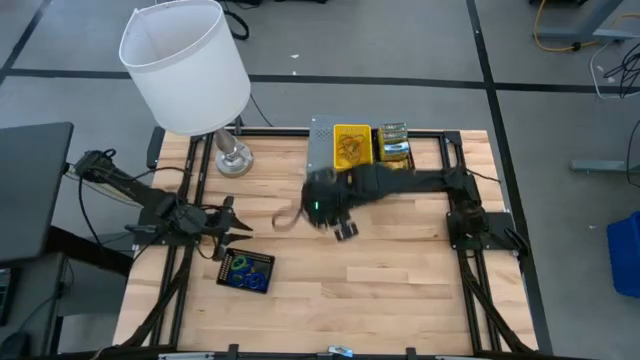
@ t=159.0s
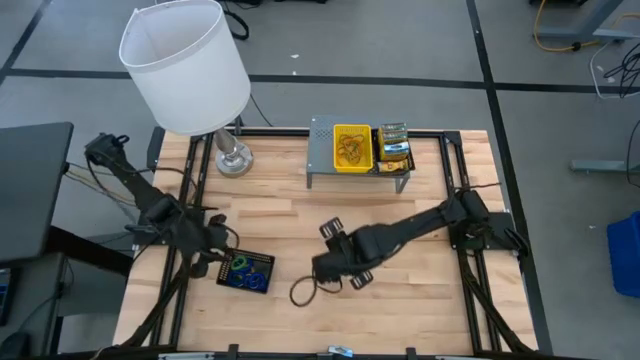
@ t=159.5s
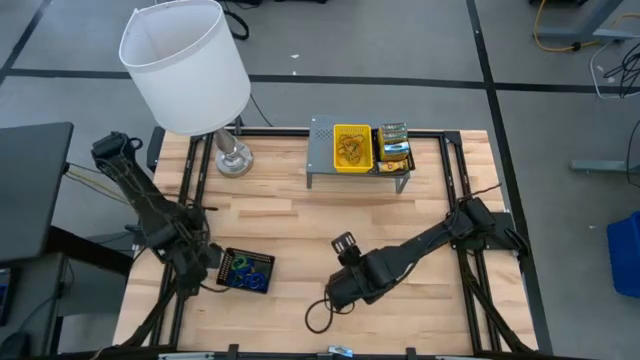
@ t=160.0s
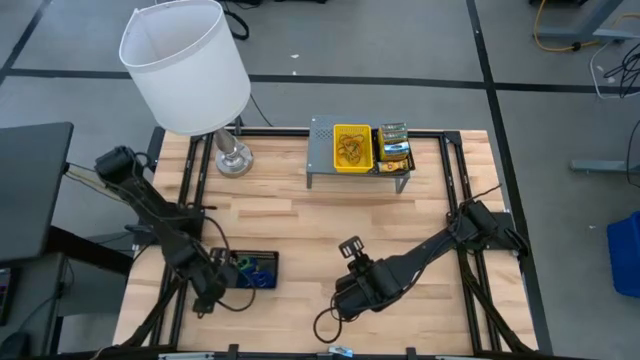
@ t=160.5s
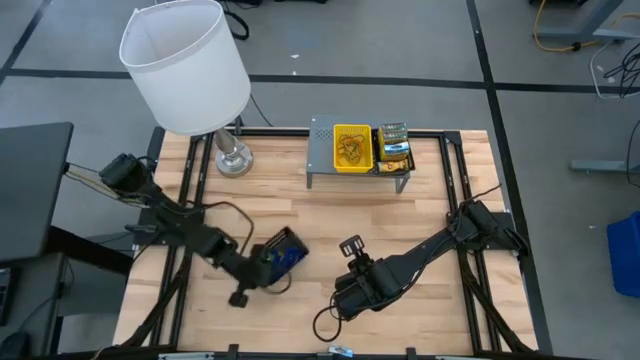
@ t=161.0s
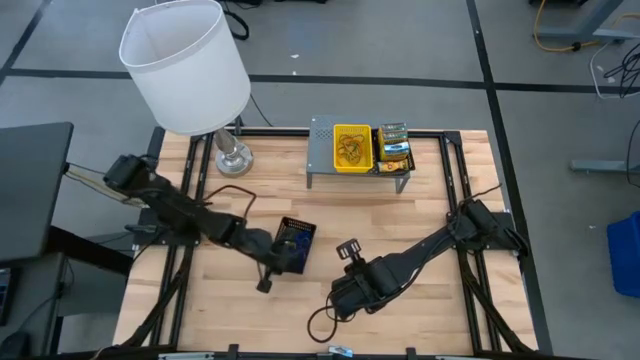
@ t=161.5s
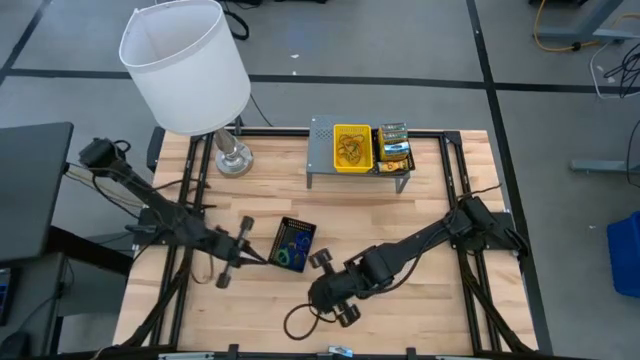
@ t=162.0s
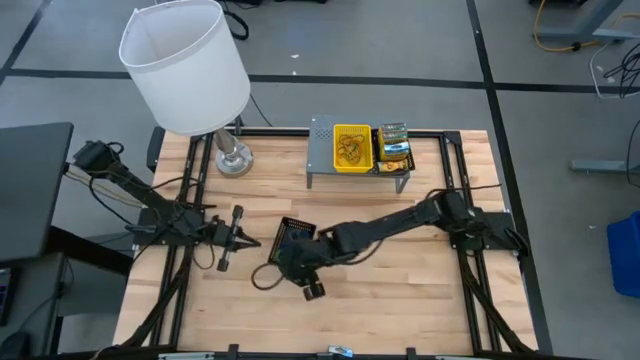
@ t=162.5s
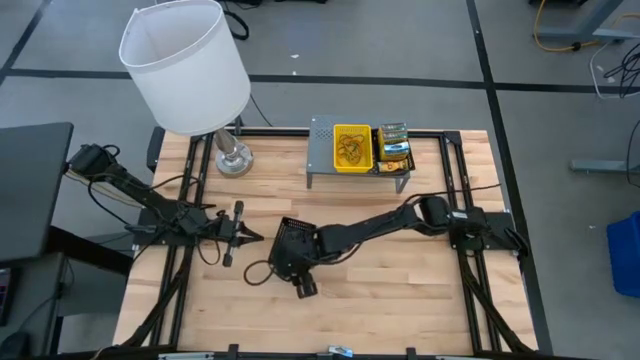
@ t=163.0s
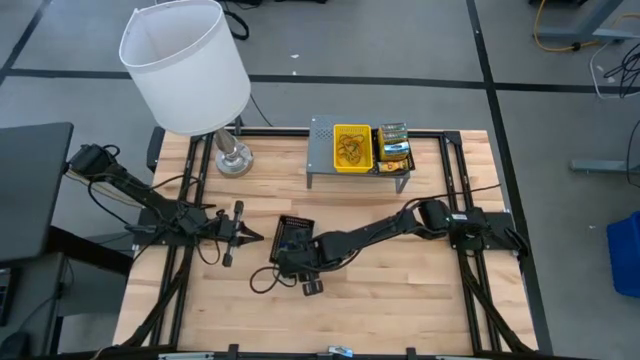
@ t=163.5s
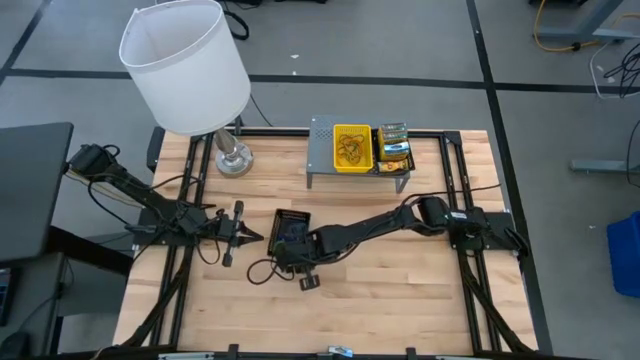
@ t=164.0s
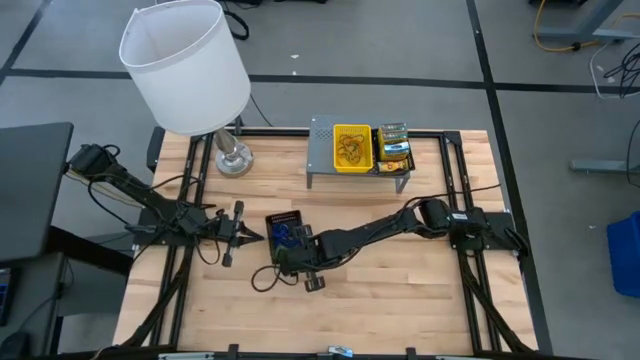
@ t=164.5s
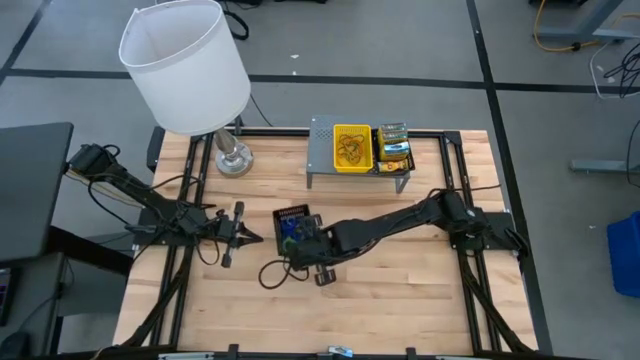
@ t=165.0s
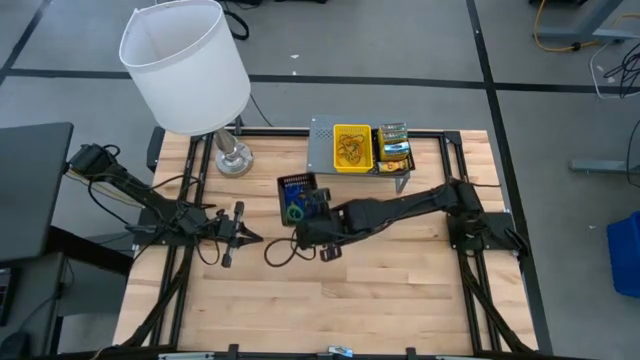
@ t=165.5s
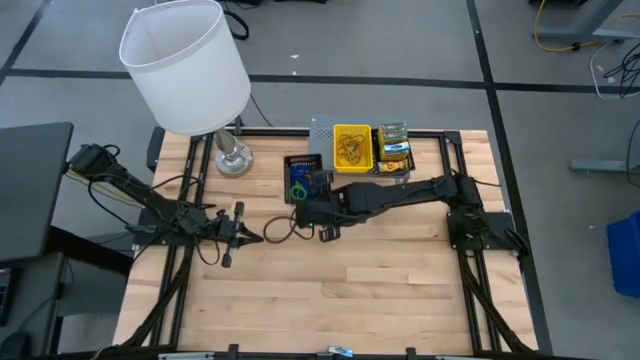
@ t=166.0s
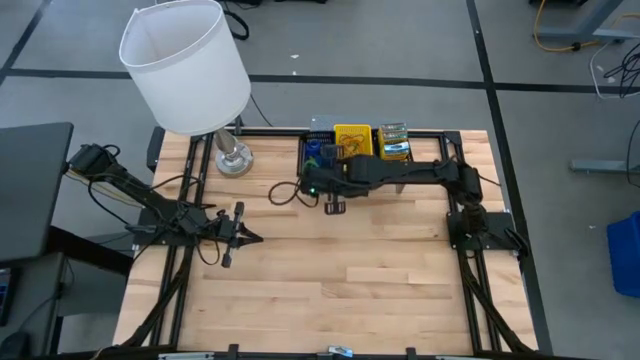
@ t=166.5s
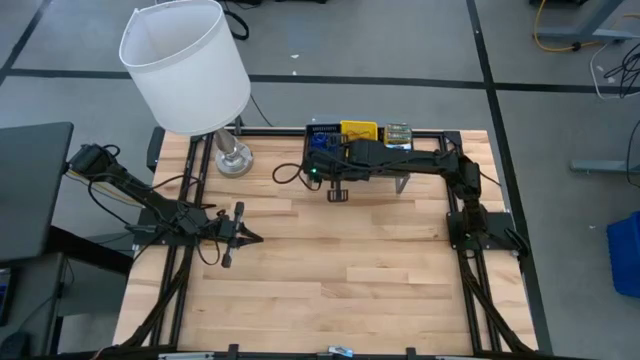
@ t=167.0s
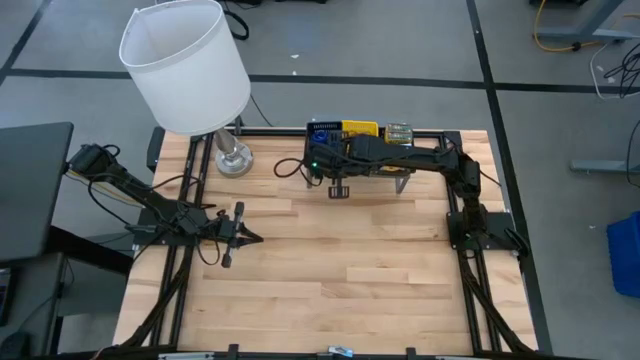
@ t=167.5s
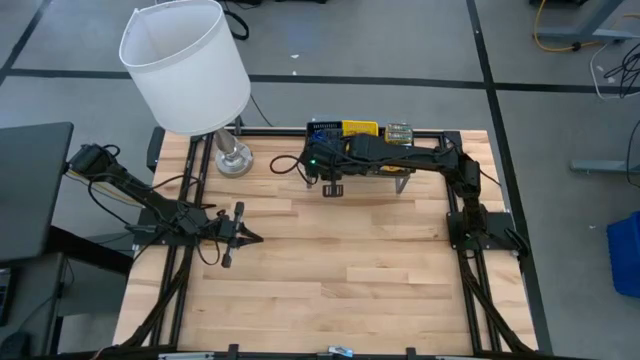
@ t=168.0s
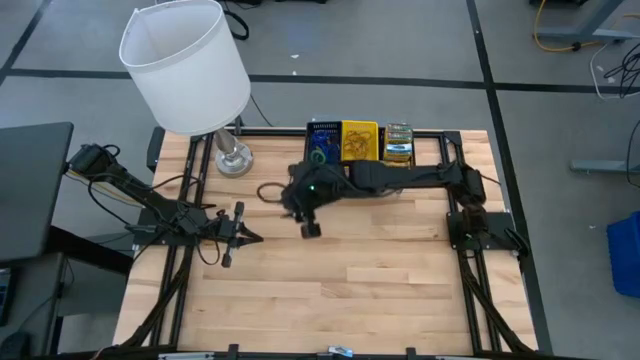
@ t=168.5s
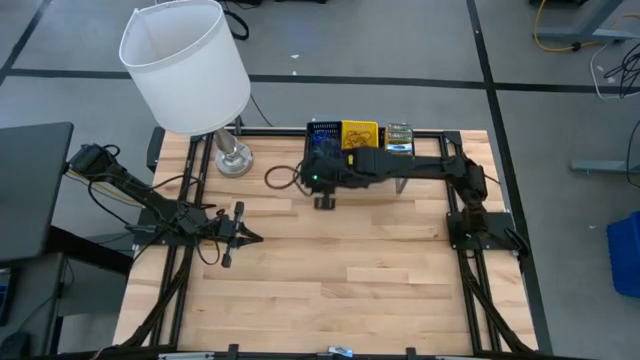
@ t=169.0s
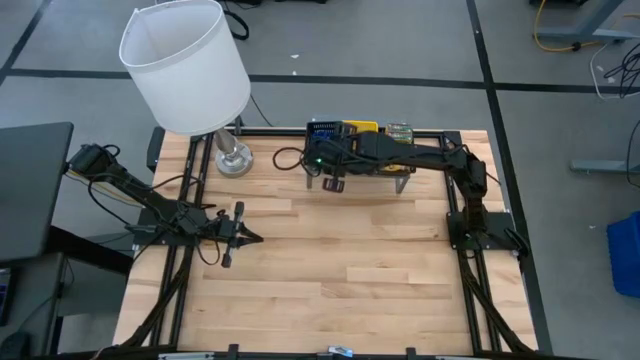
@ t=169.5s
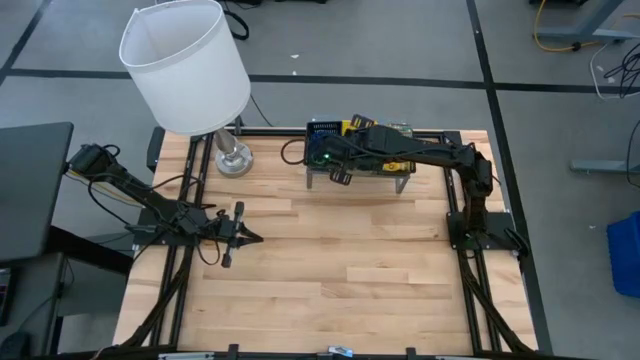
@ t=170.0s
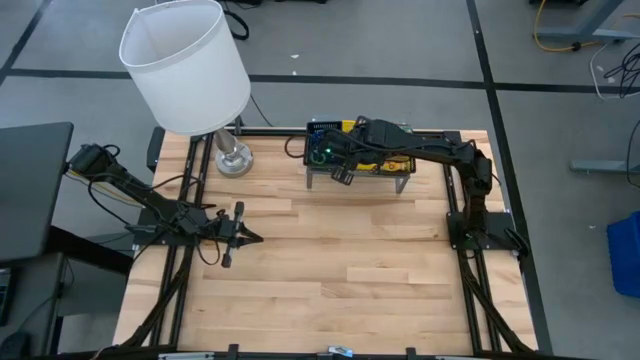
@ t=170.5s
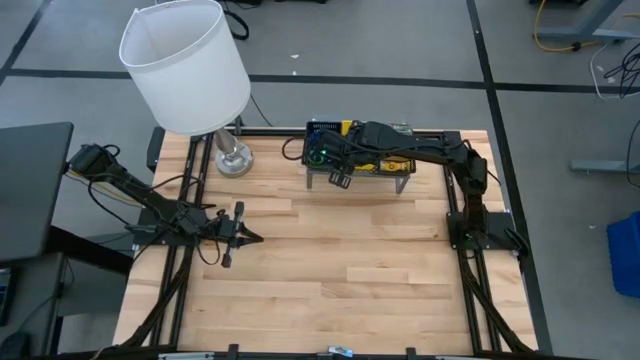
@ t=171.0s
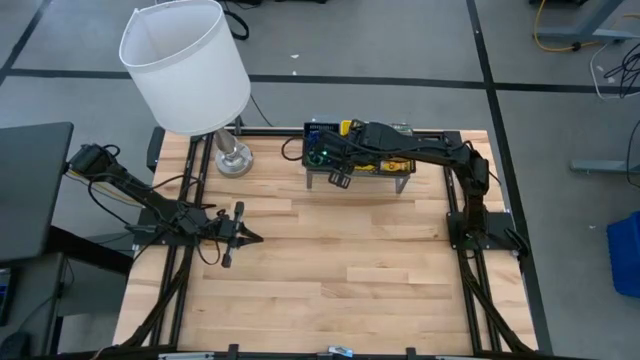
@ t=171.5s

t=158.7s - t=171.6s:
Task: Pick & Place Office Desk Supplies
Put the black bin with spring keychains on the shelf

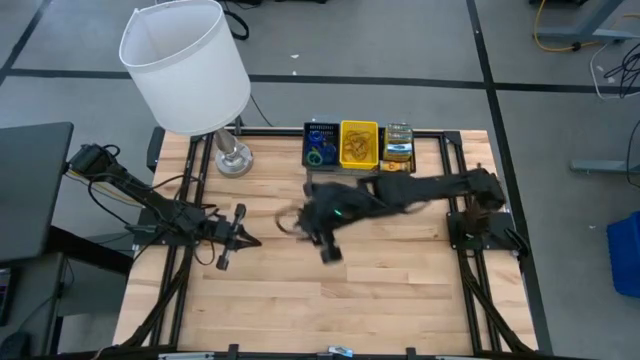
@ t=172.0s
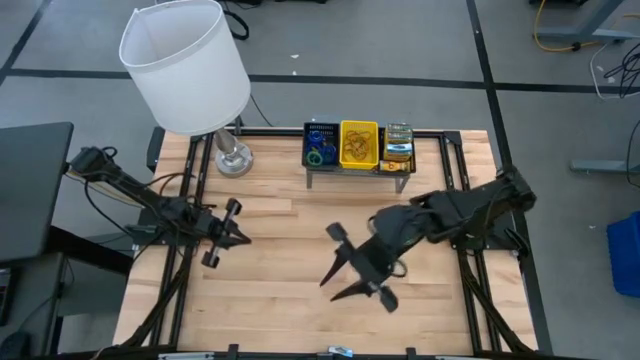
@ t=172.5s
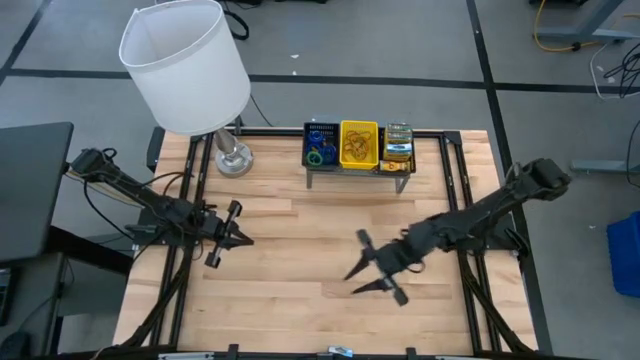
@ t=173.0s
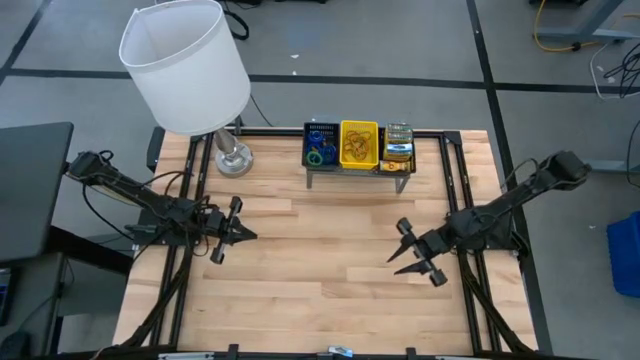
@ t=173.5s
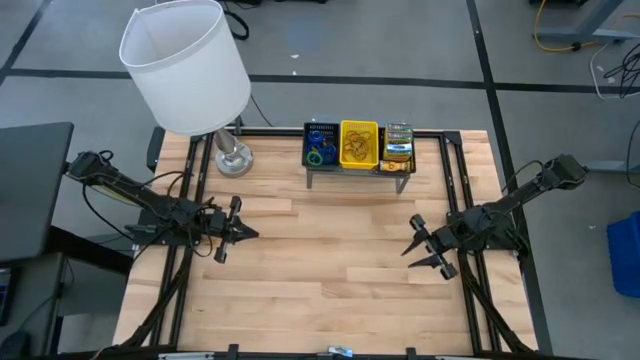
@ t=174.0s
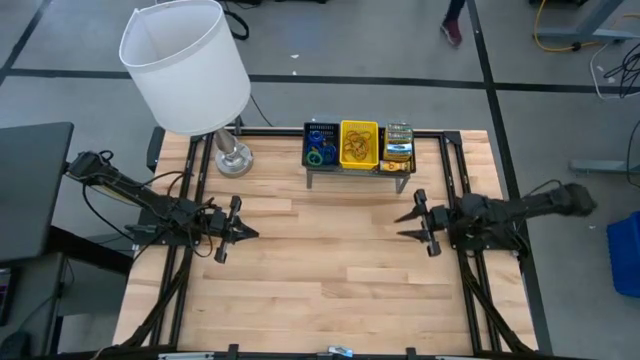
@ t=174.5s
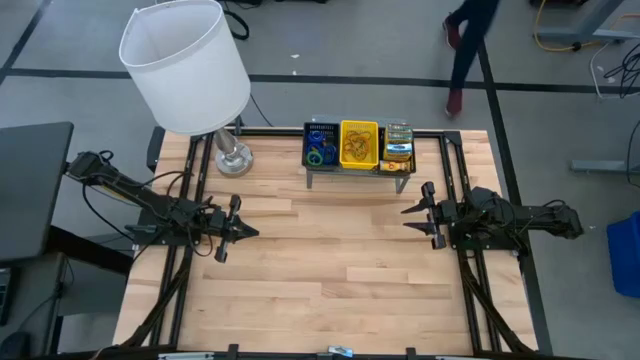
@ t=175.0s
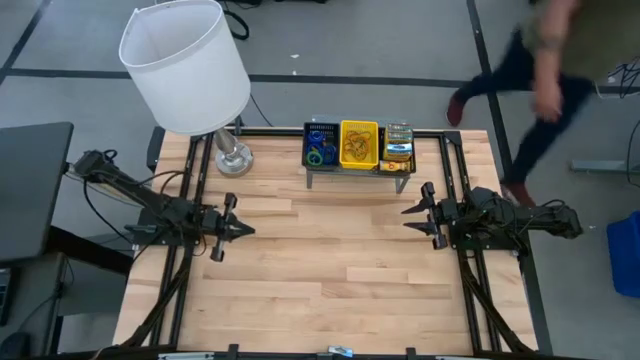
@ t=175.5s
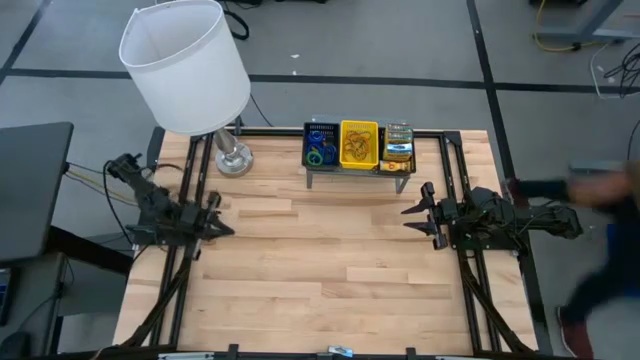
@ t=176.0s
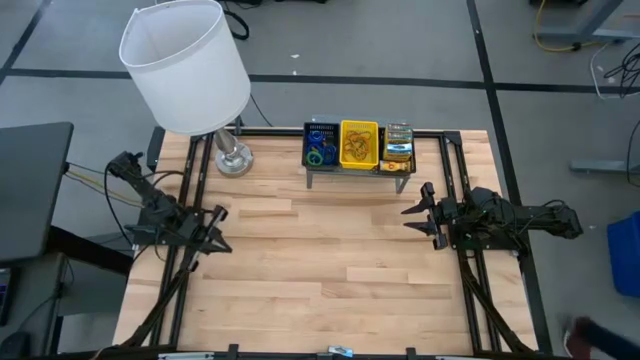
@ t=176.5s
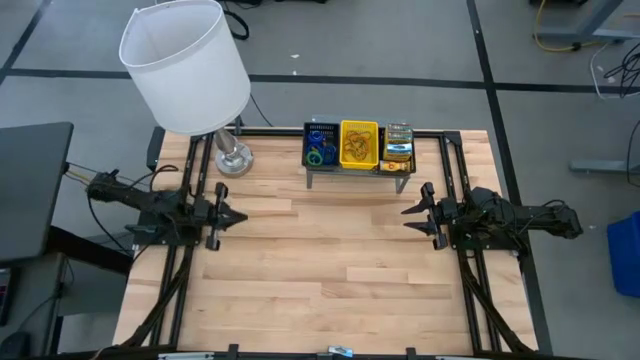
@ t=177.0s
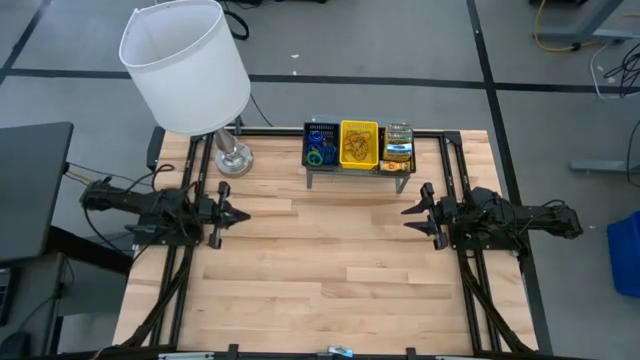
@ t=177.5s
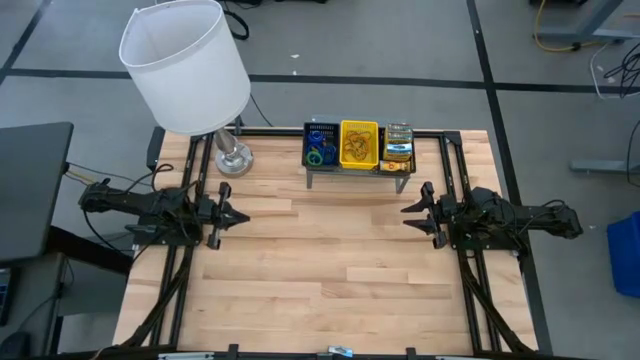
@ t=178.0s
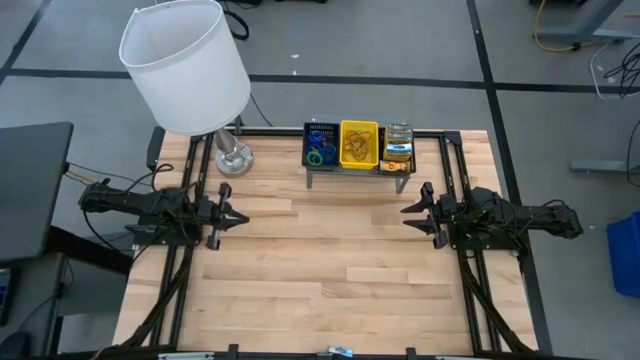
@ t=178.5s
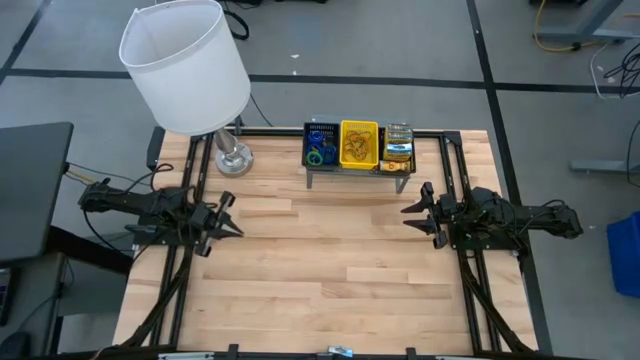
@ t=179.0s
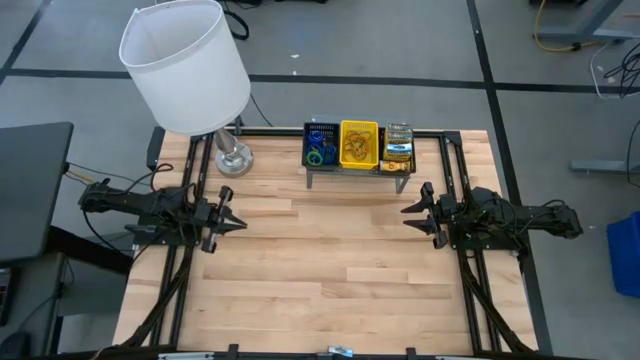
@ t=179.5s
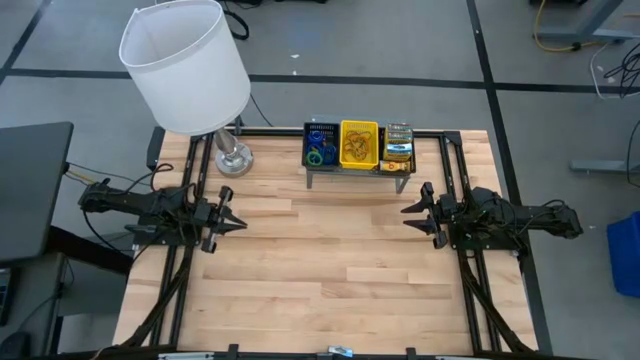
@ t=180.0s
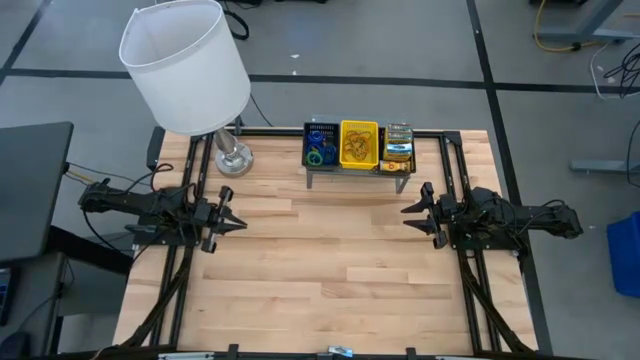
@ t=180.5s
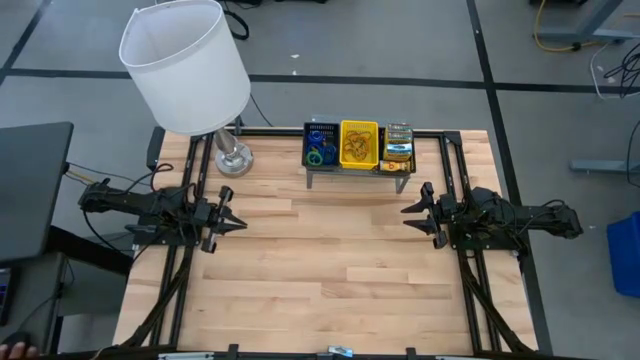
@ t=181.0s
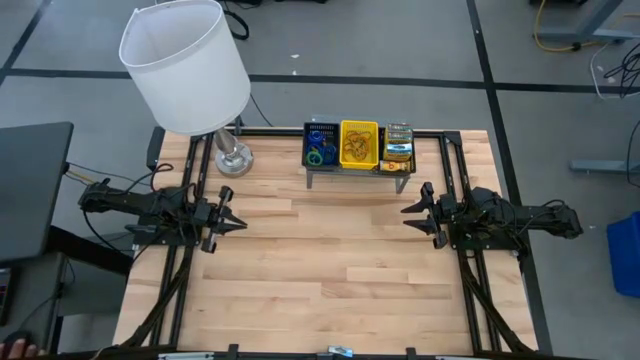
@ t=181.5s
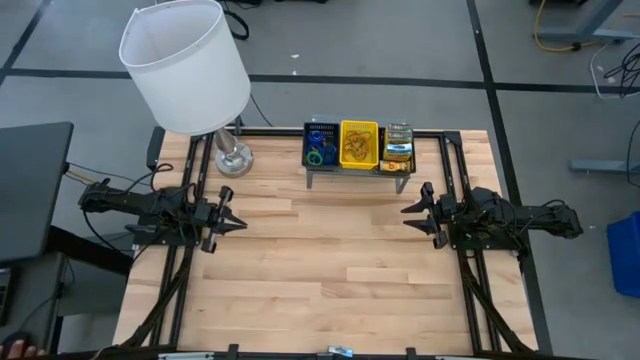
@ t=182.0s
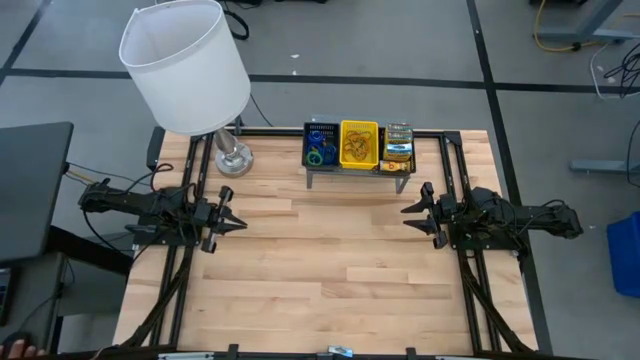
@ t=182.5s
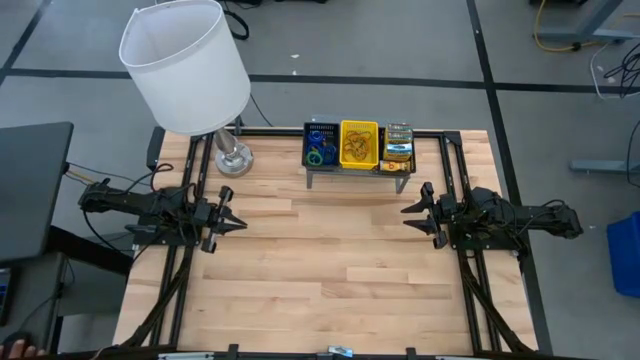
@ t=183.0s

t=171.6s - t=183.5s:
Return to Home Position
